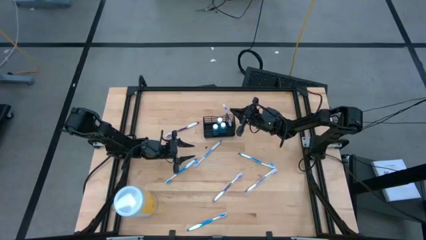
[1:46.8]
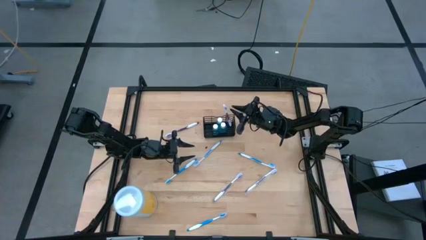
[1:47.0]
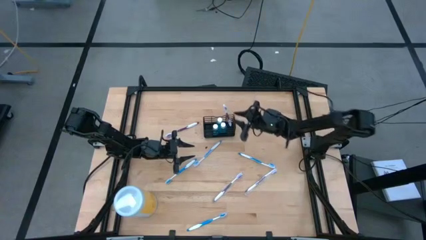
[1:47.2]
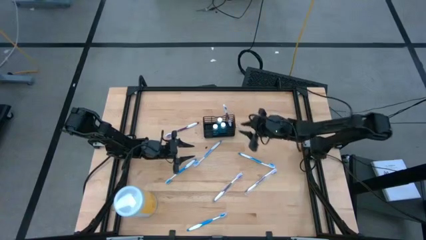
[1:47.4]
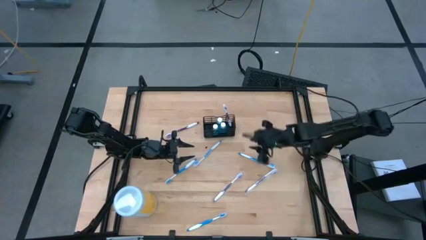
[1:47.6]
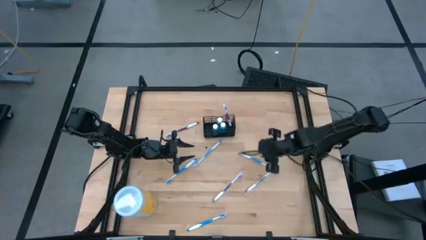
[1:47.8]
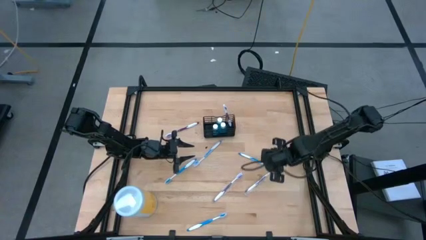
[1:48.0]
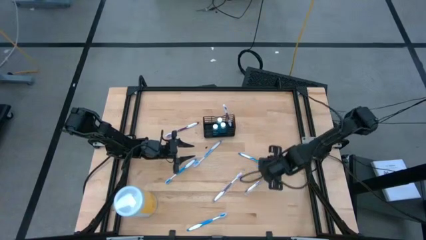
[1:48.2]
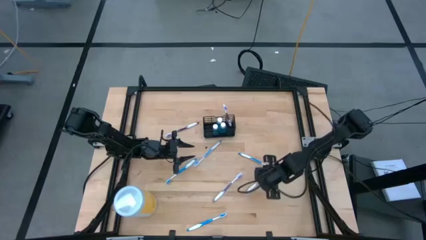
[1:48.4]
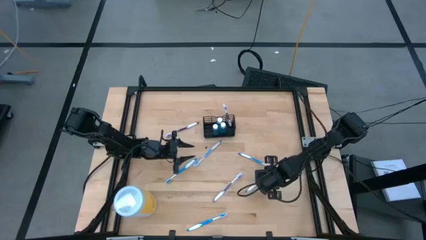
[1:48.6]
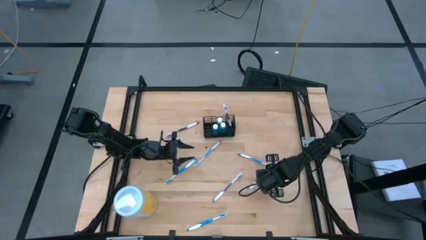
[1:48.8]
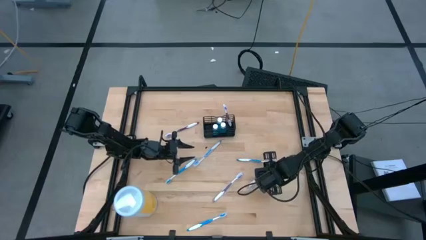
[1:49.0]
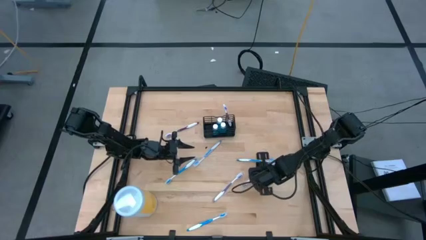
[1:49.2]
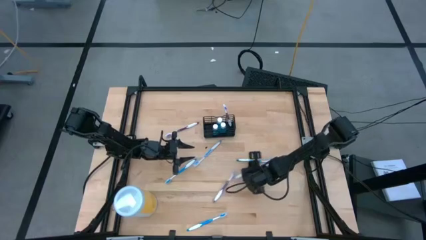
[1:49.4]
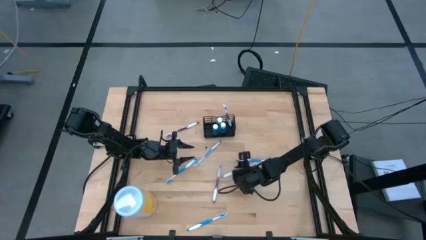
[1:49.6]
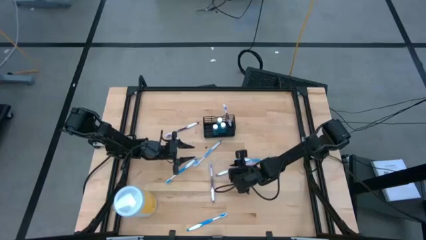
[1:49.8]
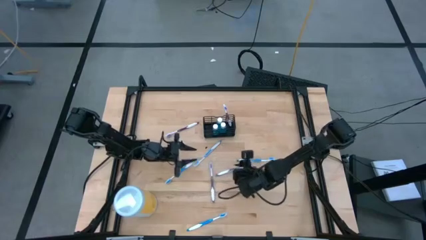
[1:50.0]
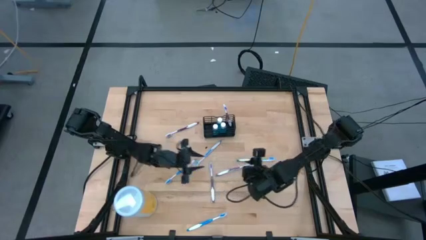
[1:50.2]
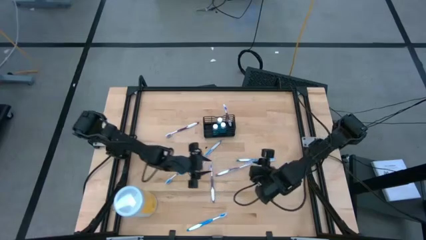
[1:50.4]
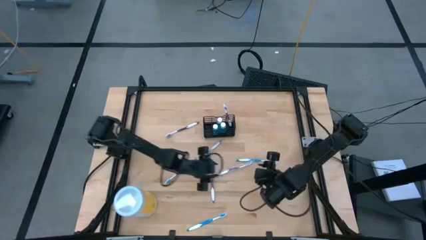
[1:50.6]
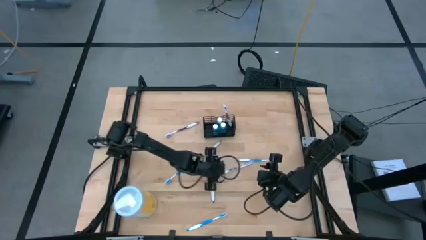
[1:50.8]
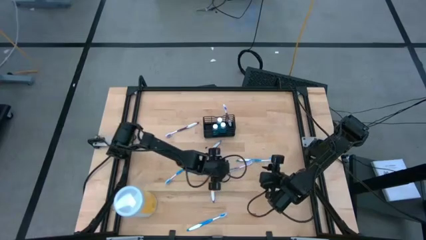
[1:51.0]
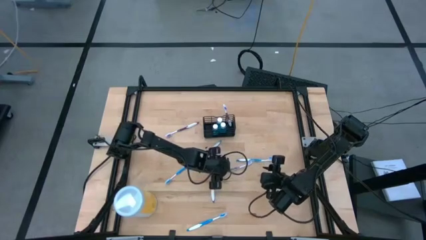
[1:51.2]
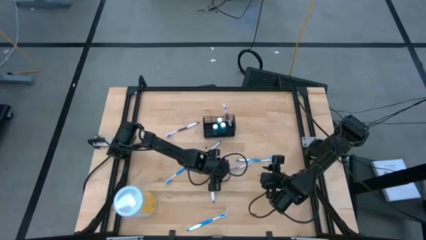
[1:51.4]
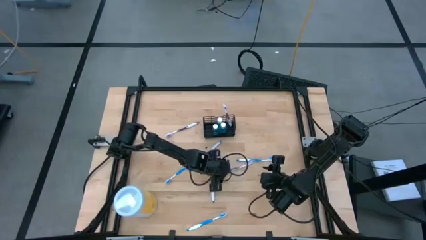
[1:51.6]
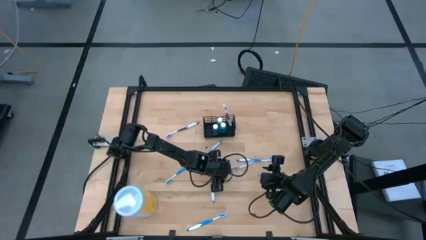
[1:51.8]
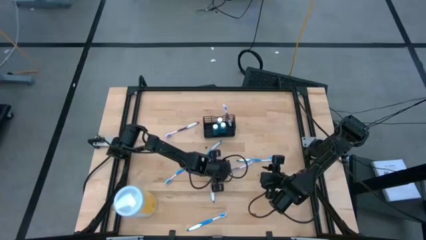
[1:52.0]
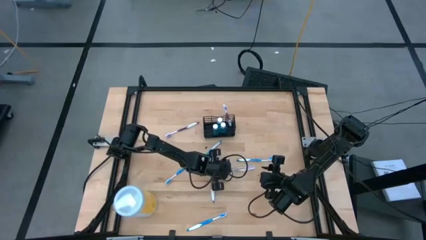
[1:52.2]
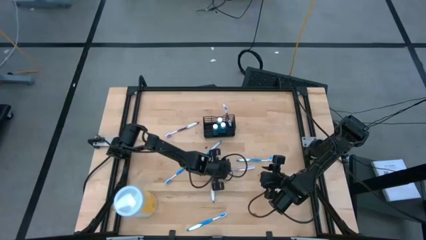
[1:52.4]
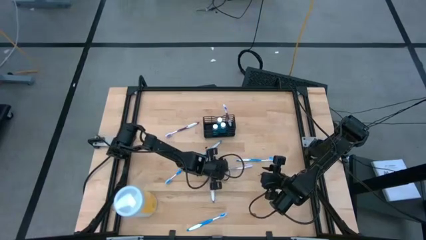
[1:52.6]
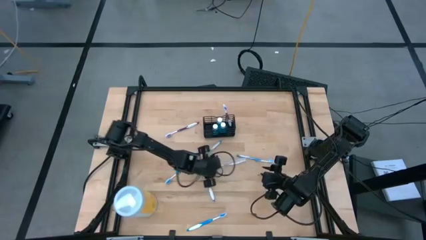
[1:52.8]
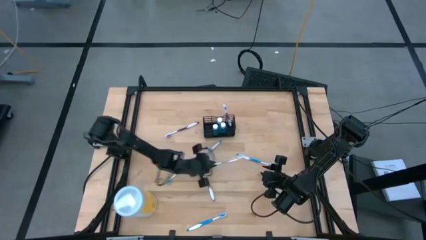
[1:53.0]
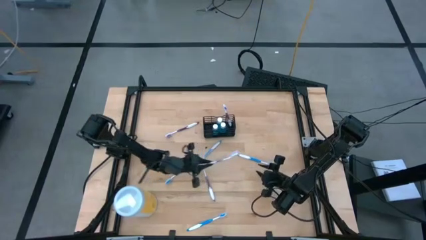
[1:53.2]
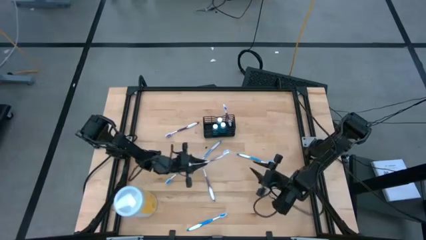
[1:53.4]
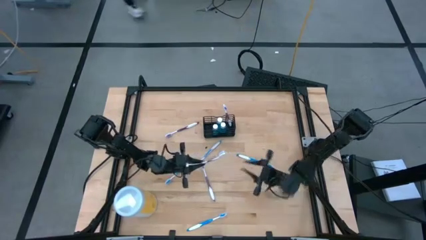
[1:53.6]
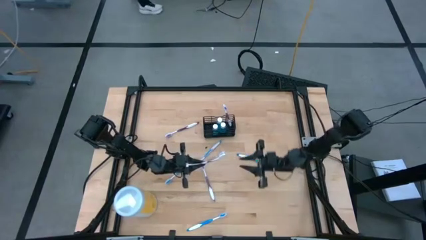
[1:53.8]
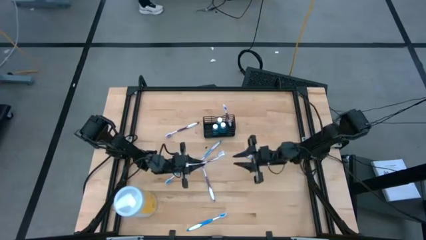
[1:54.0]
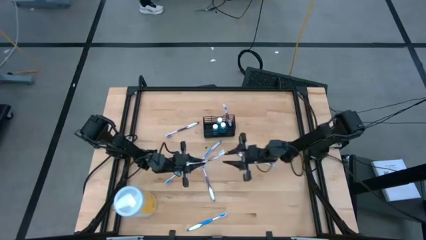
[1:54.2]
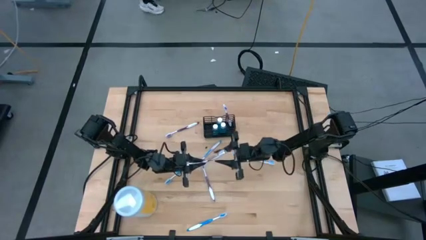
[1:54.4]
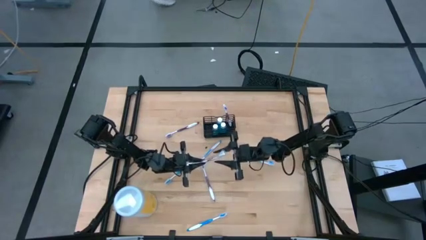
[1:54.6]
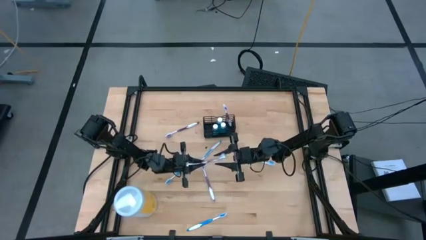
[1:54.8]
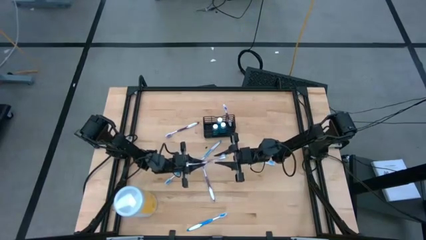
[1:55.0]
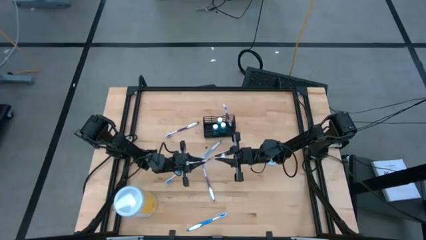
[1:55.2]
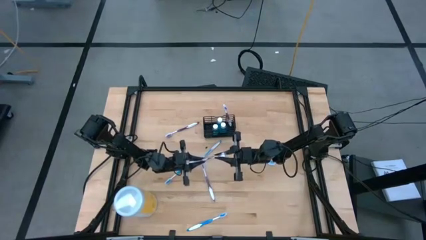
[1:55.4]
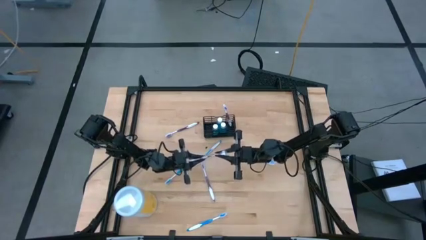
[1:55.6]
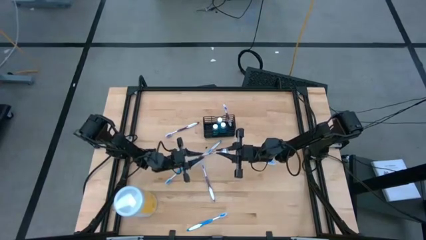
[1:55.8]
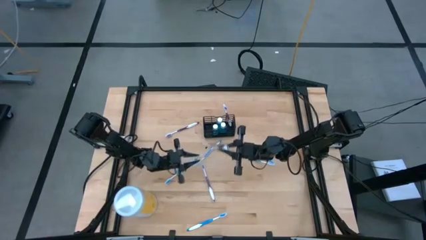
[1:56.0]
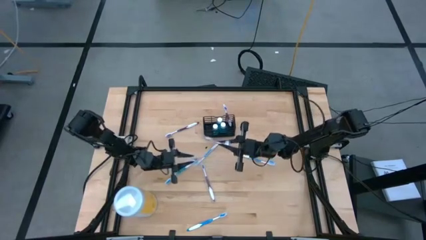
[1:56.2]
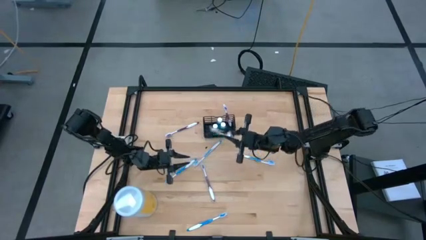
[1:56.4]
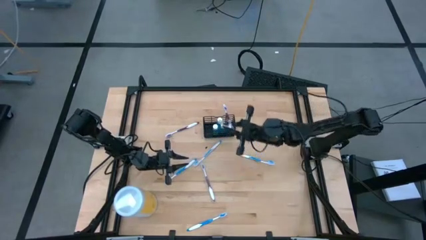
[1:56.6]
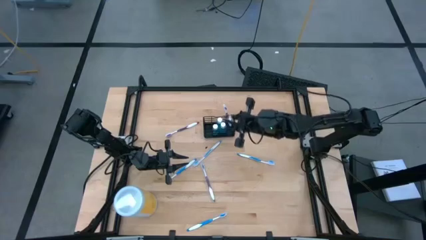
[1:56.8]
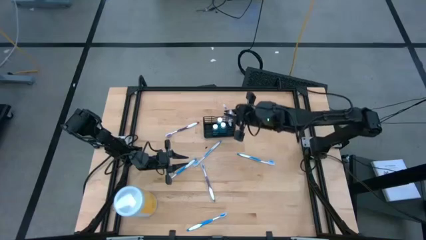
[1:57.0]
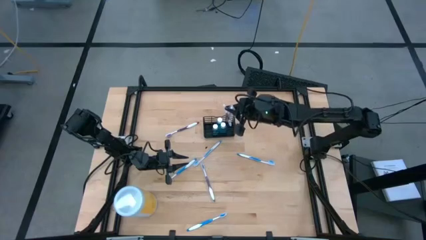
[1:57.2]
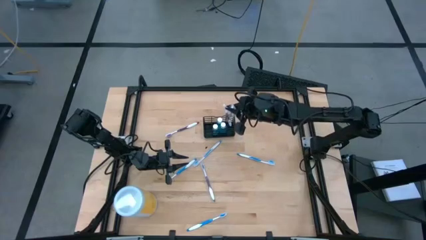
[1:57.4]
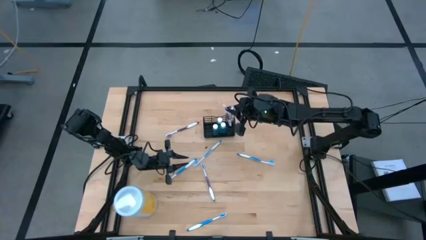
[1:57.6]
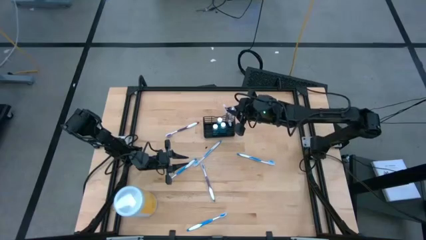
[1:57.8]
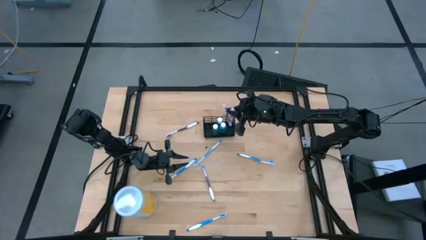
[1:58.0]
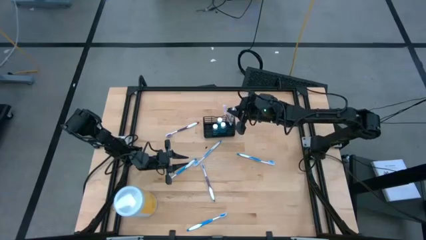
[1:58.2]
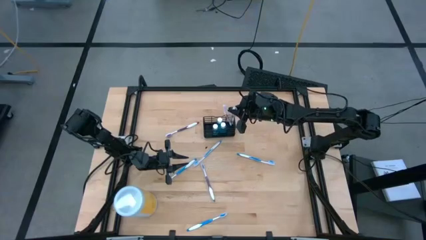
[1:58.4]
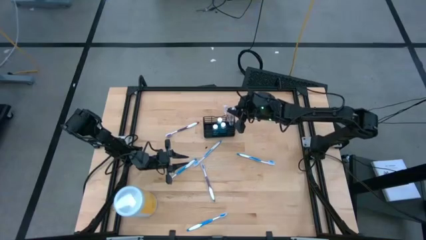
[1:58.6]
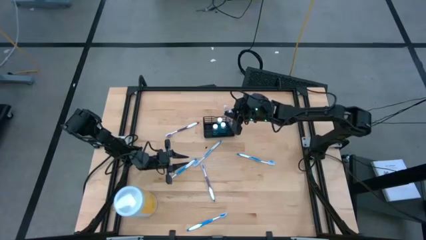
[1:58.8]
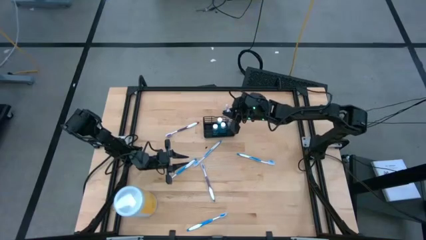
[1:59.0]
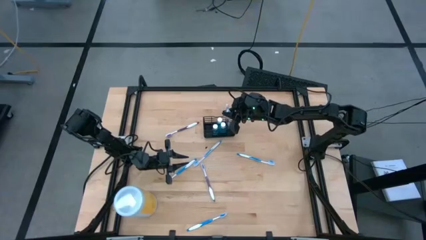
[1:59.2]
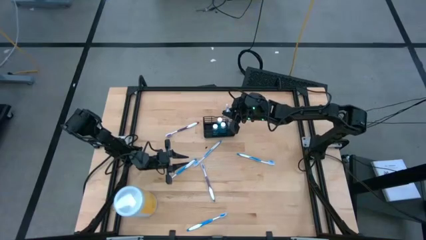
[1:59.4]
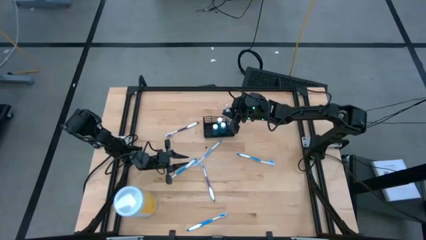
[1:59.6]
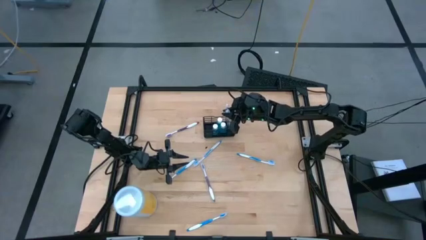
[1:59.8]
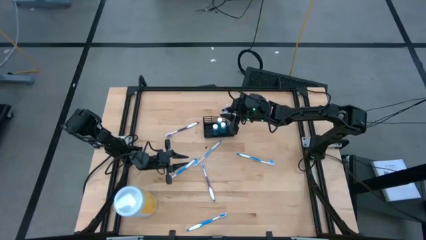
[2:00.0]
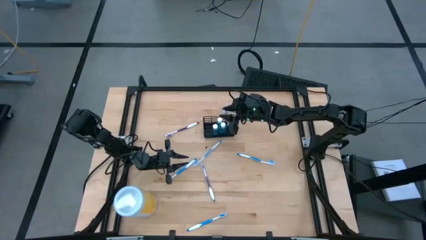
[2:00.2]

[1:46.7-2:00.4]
Task: Pick & Place toothbrushing station
Put the purple toothbrush into the black organizer
